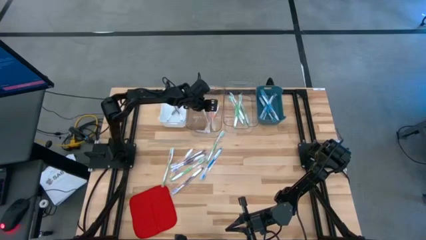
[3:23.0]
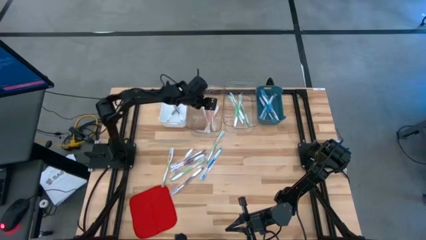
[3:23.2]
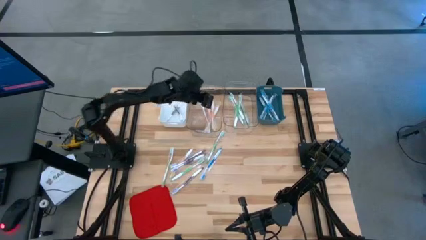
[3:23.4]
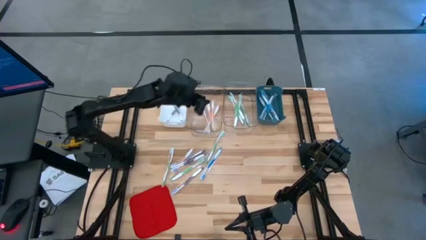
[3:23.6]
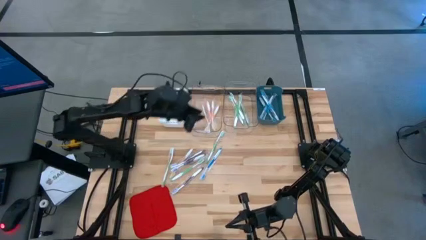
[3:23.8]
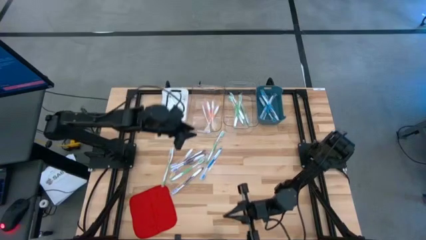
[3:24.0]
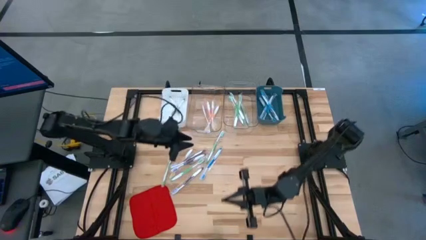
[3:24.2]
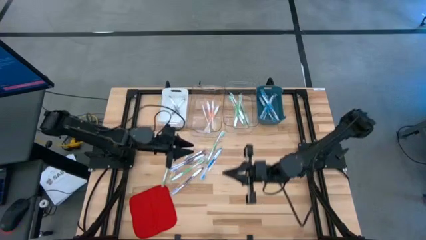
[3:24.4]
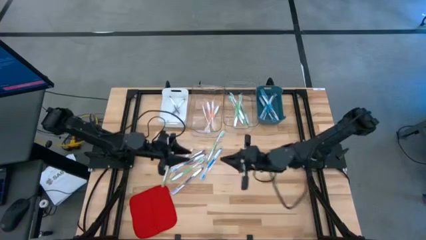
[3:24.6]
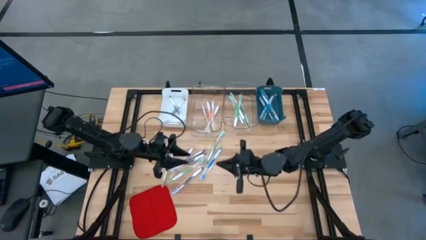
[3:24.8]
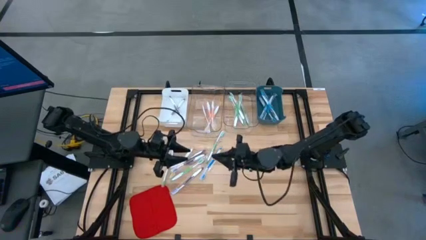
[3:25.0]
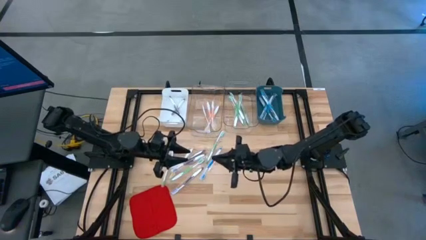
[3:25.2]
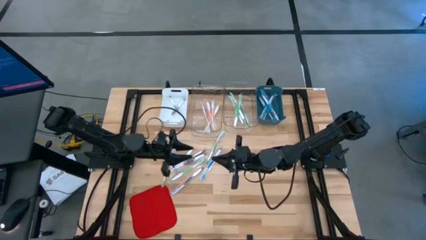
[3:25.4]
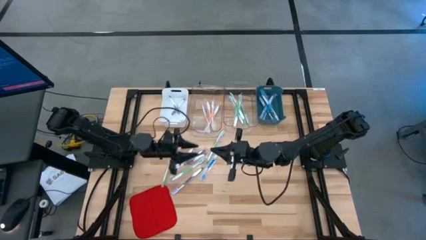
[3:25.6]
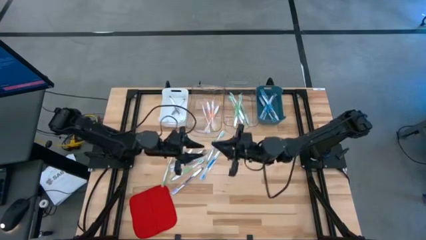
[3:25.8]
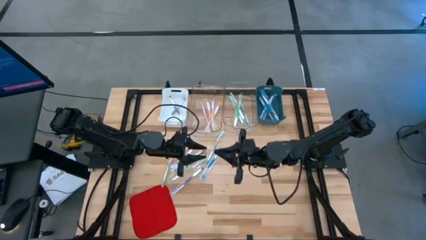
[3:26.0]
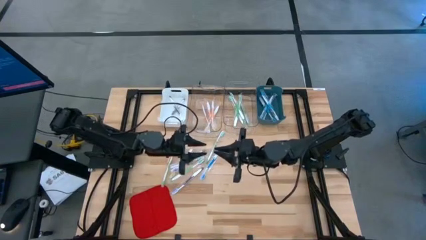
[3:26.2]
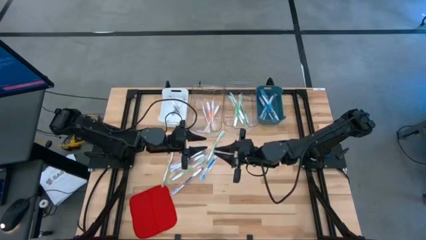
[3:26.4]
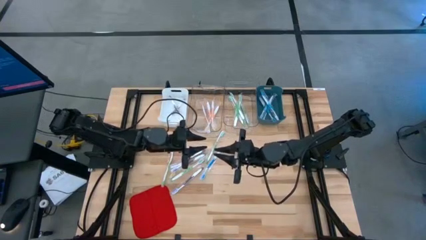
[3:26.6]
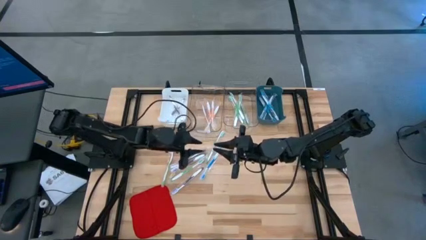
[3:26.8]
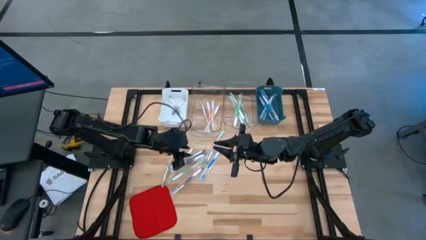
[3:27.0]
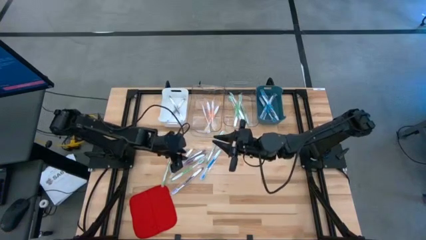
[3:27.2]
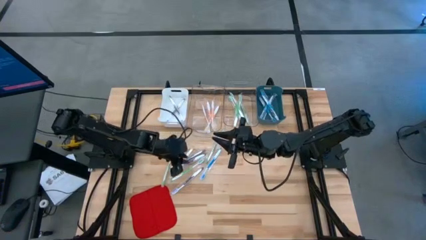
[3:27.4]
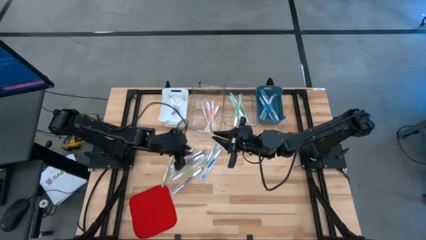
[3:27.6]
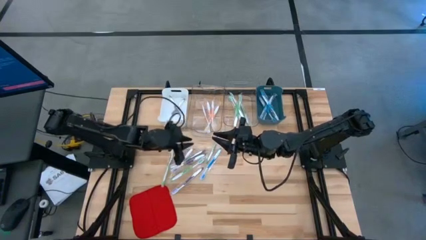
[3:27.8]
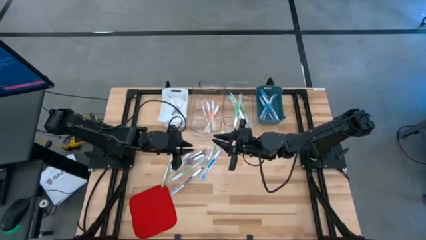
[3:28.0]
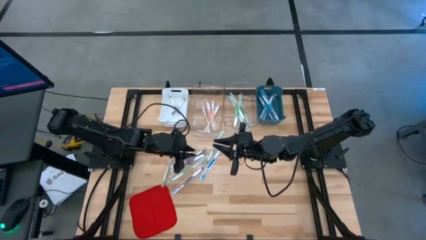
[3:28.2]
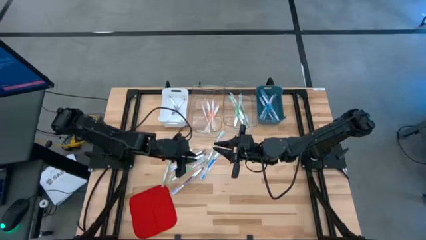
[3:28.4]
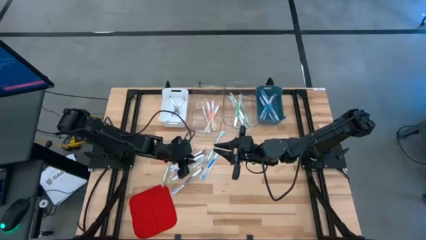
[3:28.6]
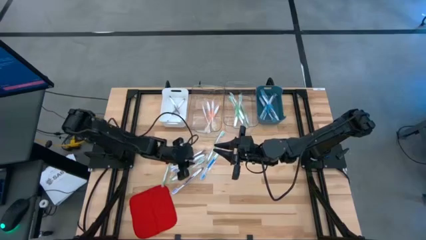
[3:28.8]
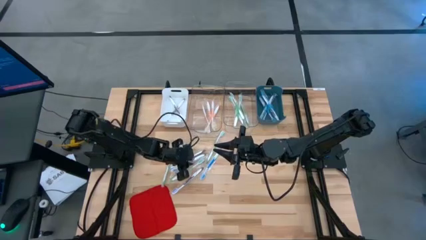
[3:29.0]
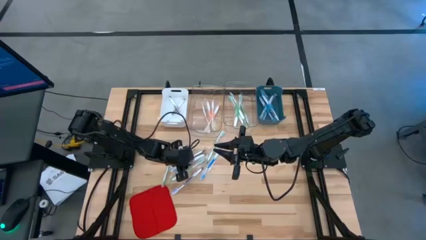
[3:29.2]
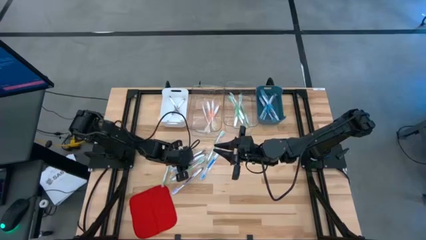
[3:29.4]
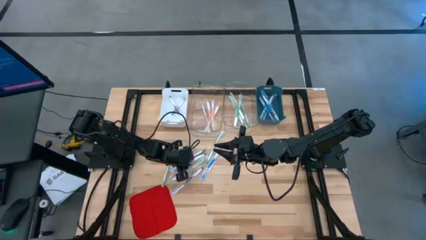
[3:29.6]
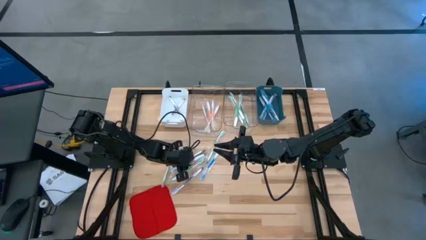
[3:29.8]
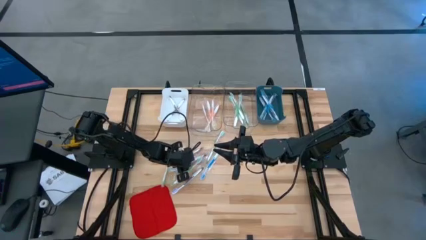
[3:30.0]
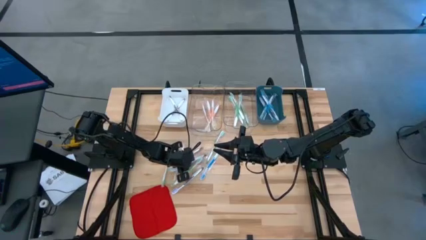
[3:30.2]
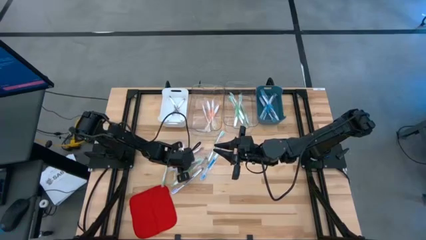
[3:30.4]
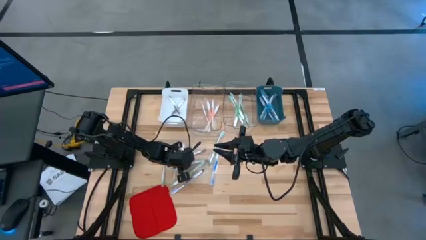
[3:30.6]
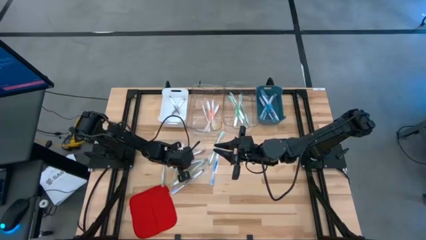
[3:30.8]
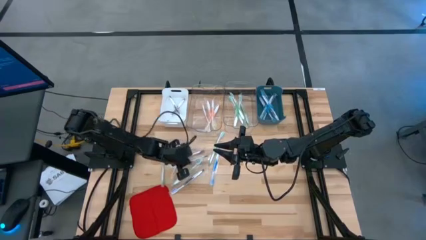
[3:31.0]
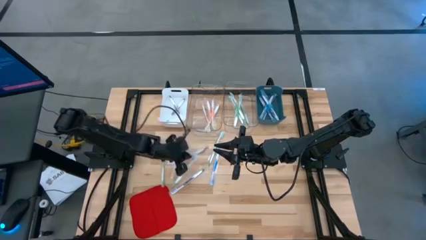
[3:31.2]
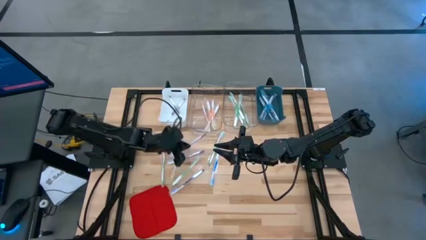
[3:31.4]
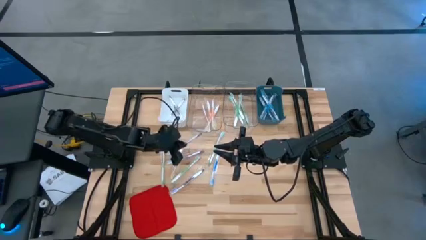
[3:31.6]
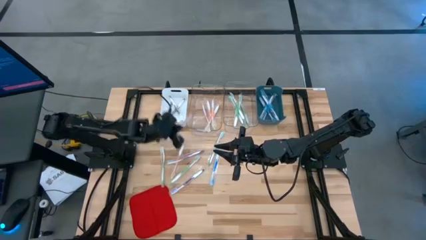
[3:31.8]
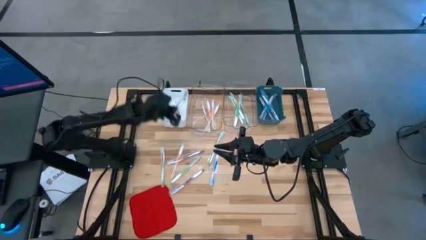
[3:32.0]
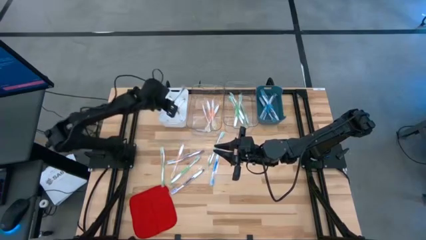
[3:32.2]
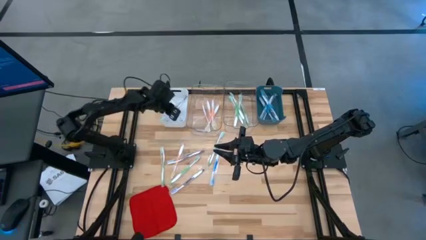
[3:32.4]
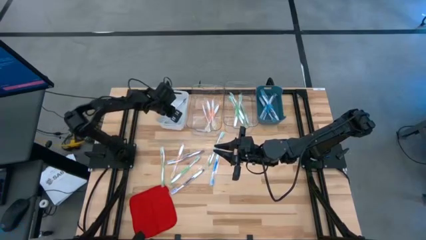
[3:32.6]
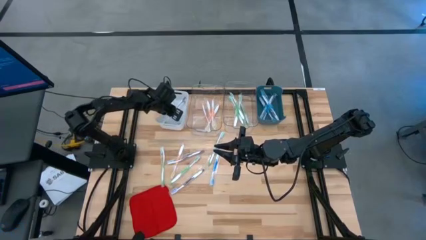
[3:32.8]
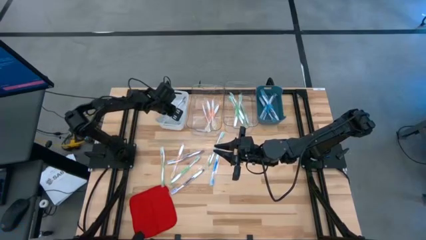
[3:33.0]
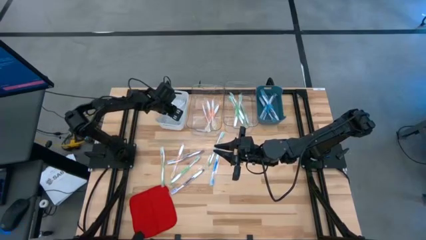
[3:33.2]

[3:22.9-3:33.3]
Task: Pick & Place Toothbrushes
Put the violet toothbrush into the white bin

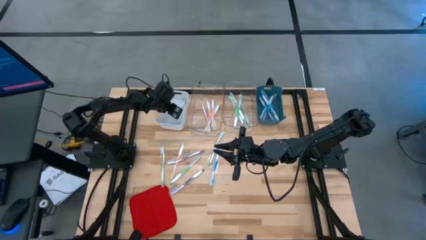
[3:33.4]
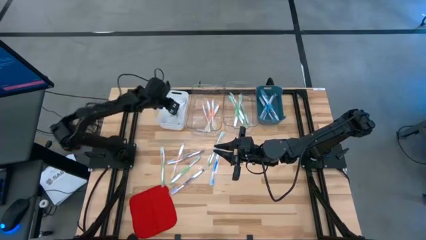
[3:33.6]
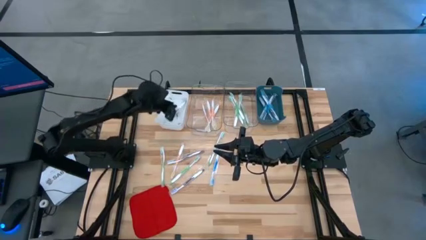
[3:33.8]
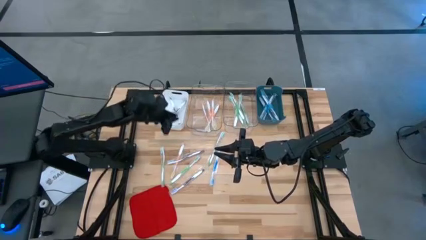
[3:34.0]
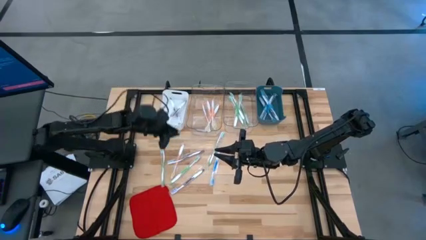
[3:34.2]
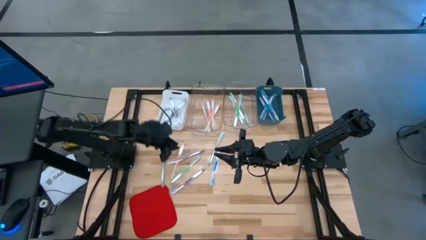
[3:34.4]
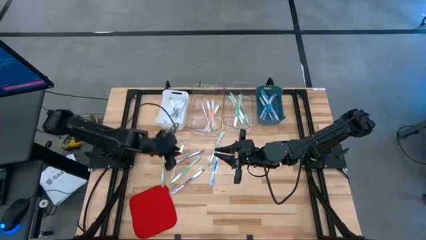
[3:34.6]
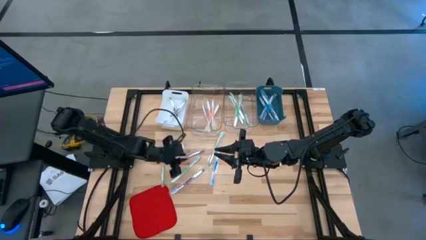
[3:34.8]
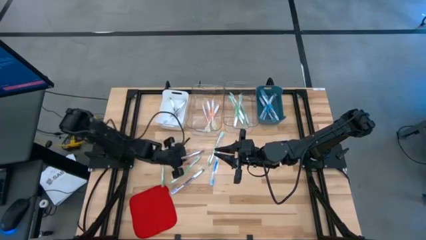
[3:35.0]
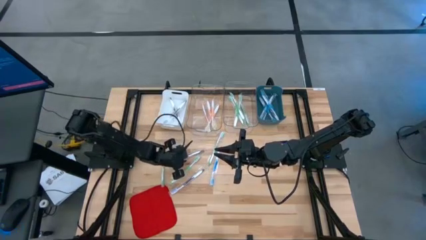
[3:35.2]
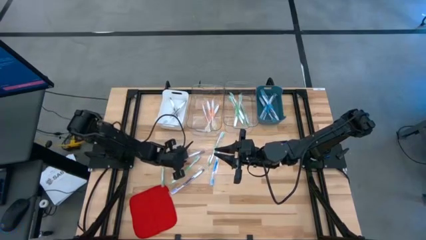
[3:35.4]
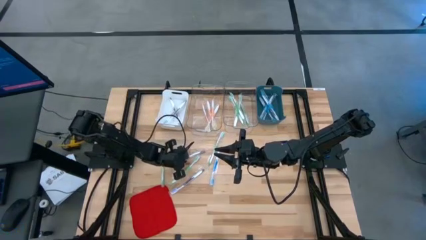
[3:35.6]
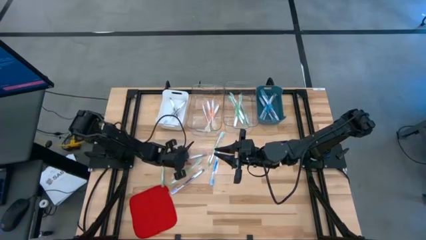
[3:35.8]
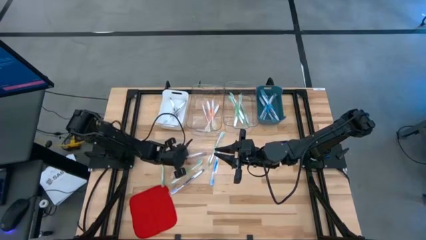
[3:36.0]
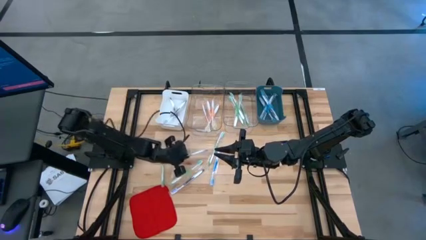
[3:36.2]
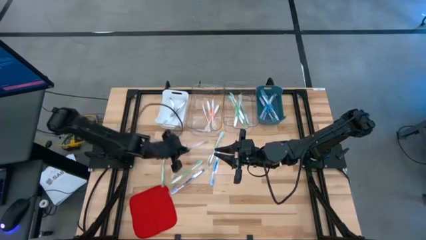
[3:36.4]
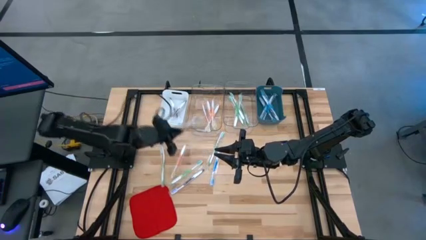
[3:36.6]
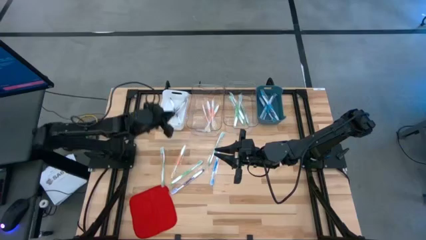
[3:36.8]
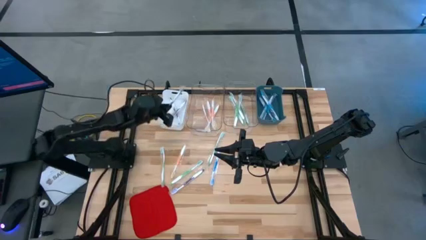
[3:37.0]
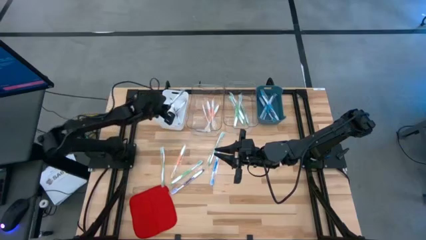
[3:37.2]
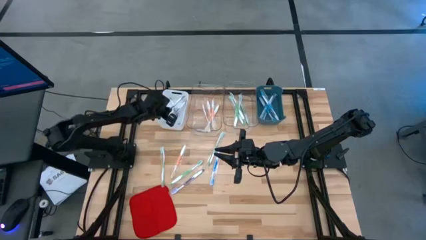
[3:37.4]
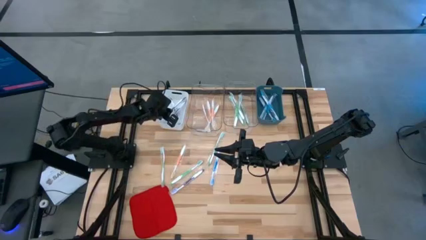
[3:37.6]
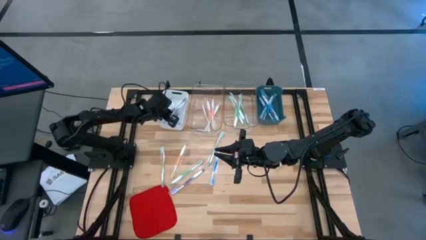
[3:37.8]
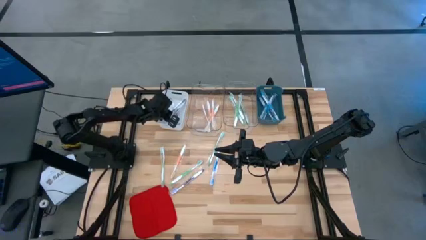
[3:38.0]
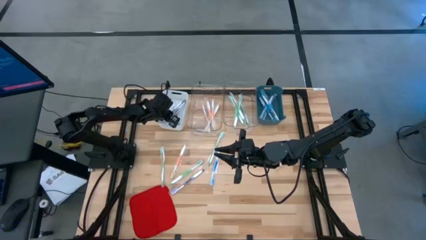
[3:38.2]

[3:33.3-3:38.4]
Put the violet toothbrush into the white bin

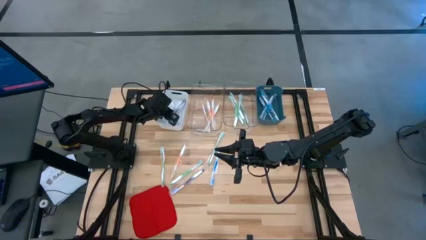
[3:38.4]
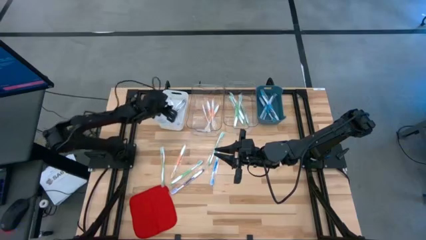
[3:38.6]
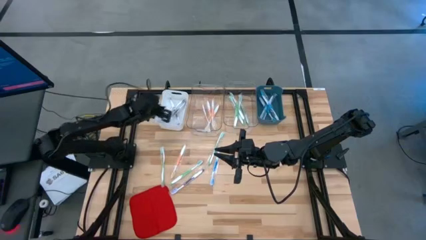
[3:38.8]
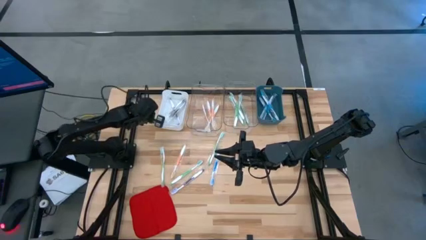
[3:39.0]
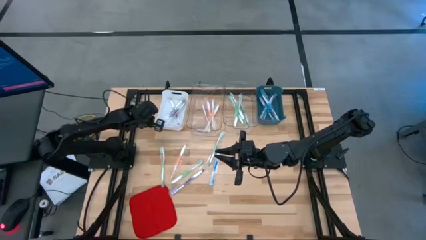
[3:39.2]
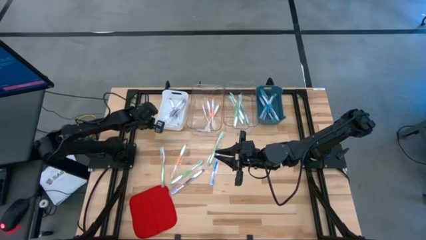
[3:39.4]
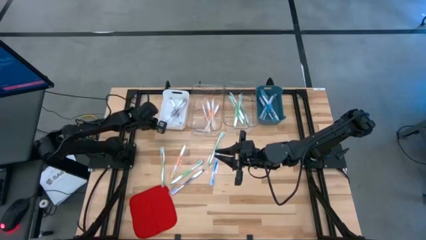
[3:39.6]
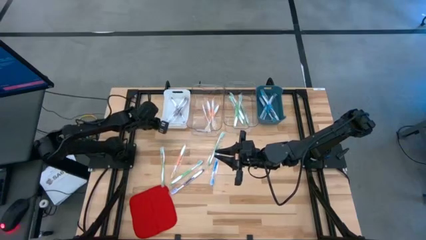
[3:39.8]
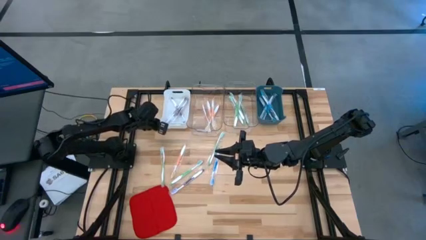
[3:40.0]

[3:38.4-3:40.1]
Adjust the white bin
